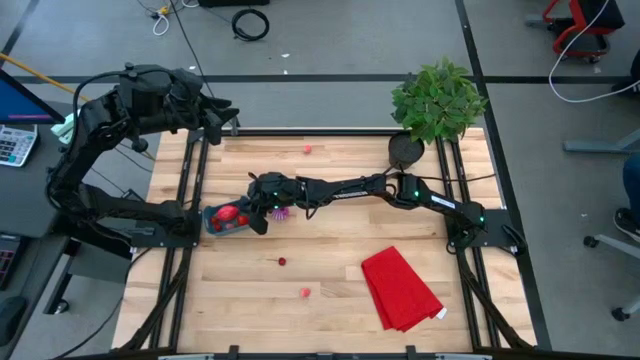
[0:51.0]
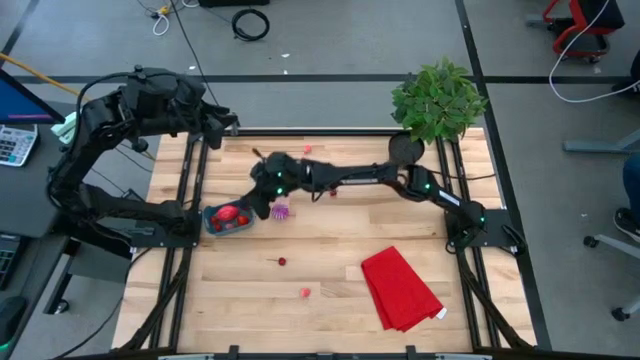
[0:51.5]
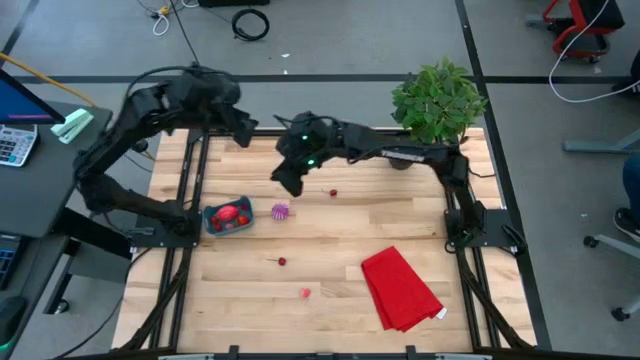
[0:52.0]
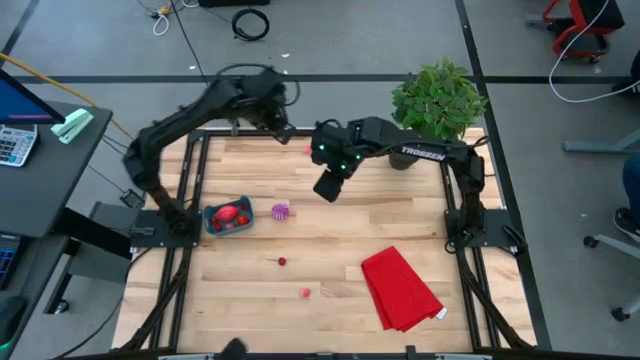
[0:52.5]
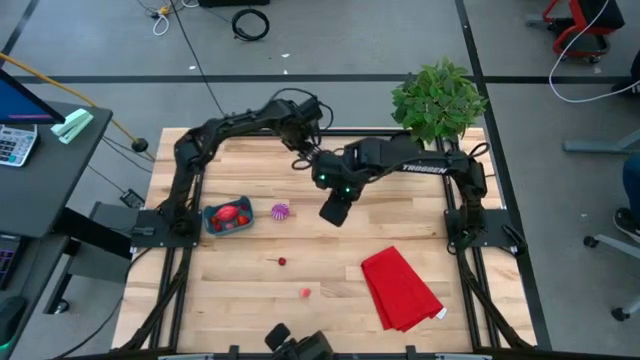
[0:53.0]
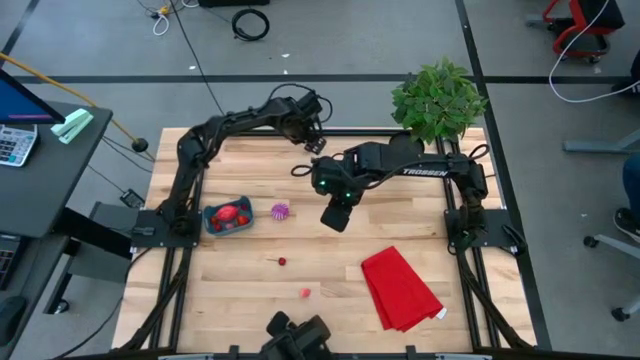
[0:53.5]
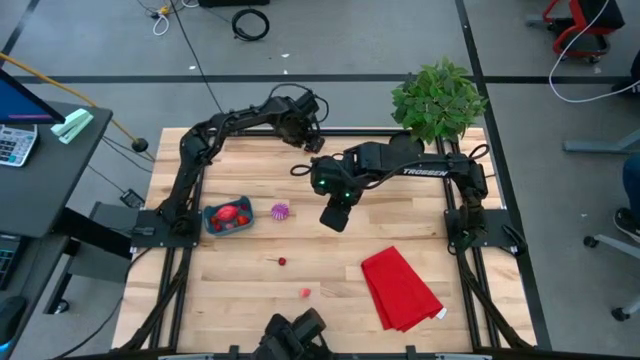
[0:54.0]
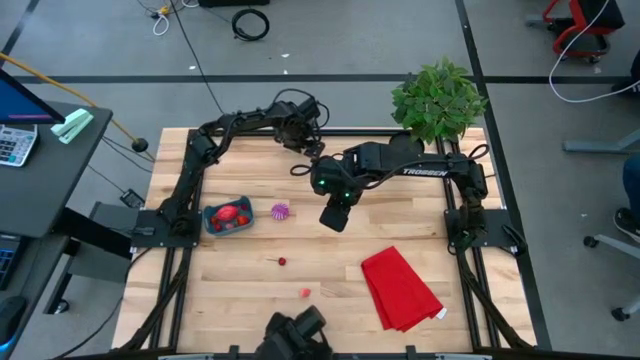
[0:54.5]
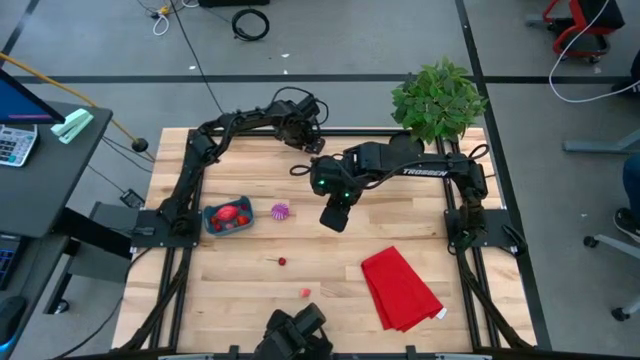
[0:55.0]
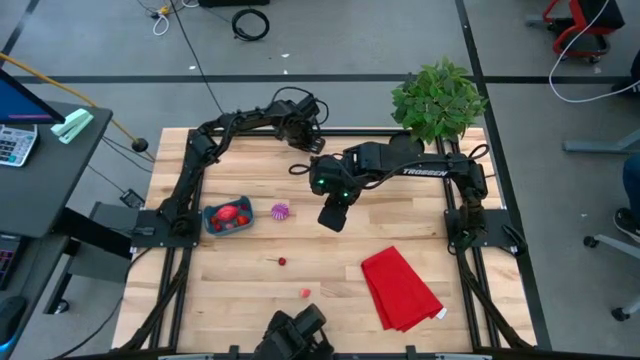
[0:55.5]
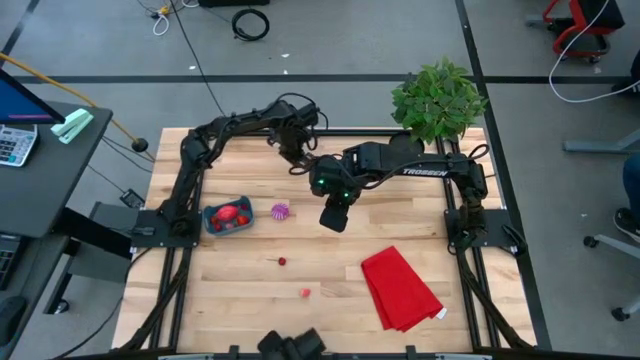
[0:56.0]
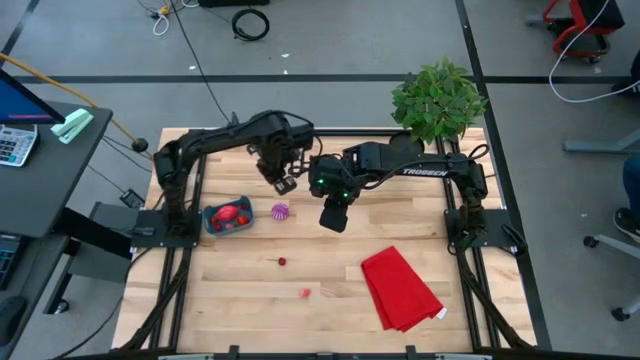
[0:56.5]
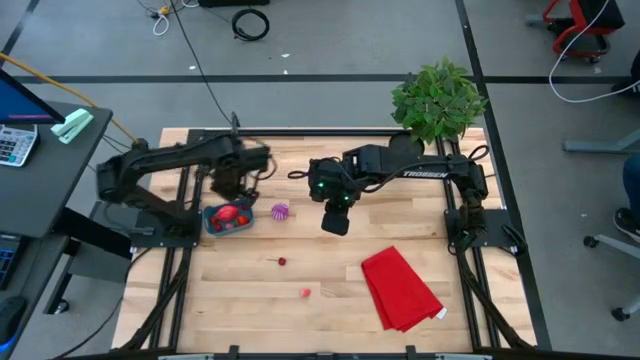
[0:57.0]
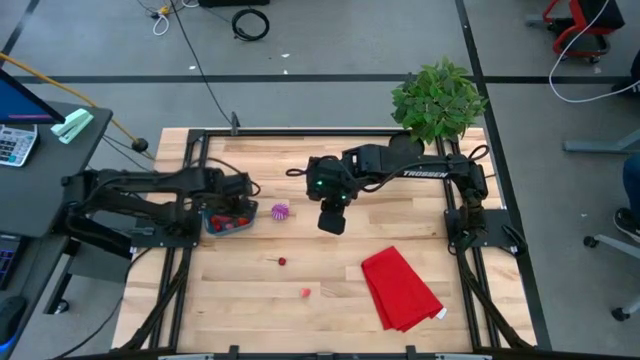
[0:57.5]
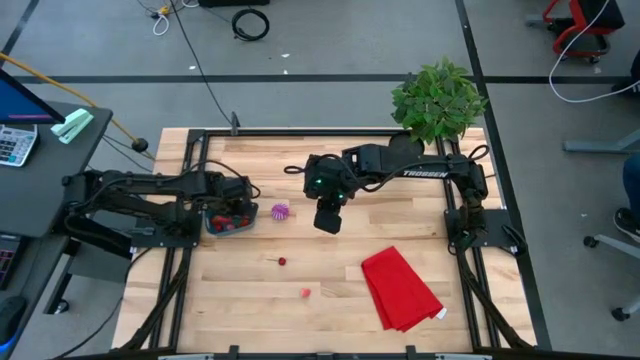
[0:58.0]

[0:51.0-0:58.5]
Task: Pick and placing Produce into tupperware
Put the top pink peach into the blue bin

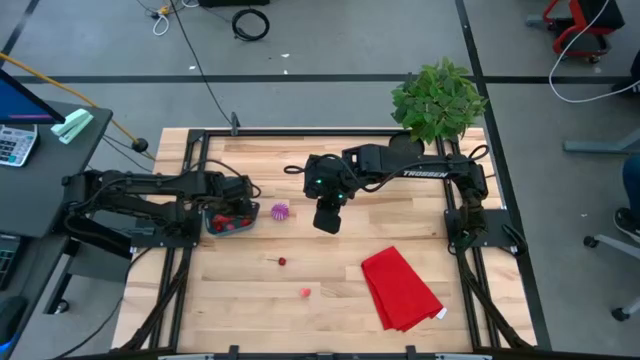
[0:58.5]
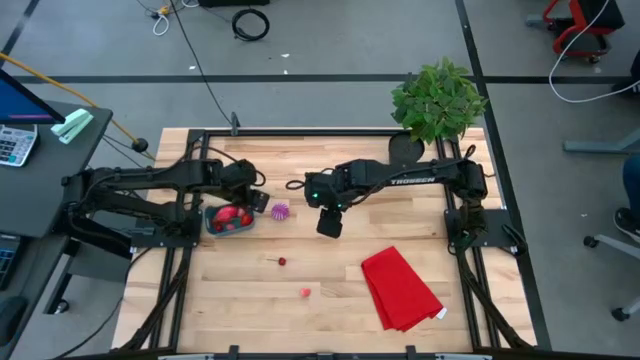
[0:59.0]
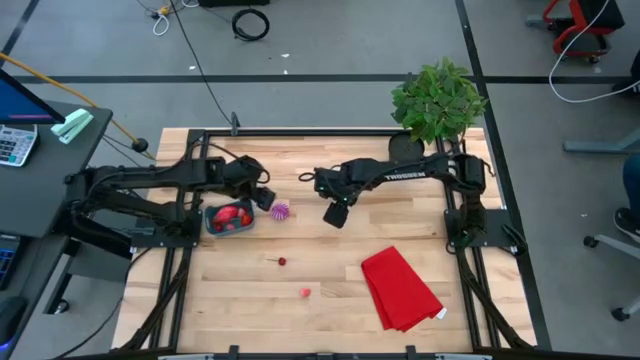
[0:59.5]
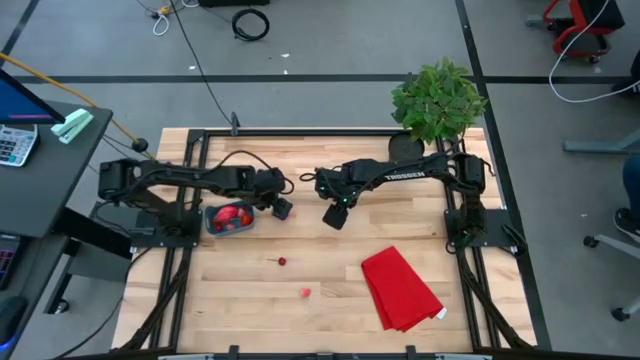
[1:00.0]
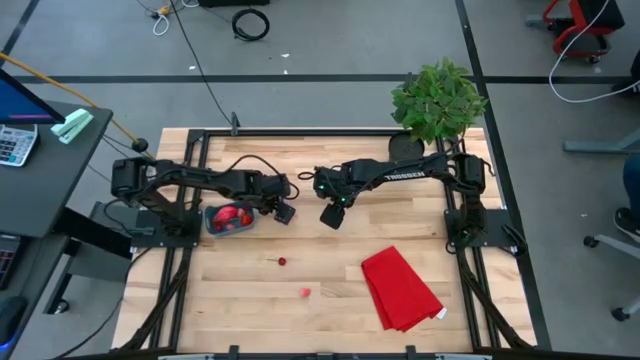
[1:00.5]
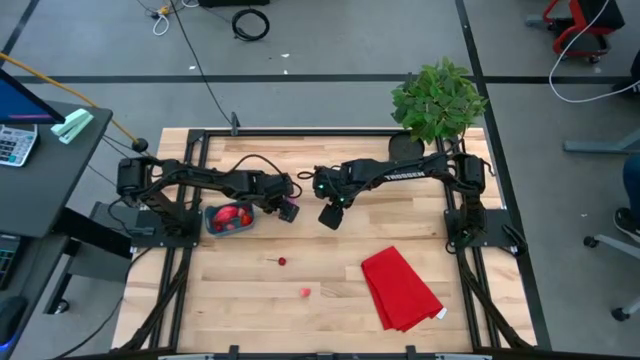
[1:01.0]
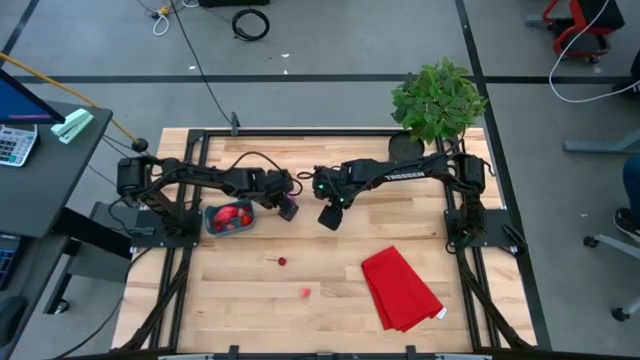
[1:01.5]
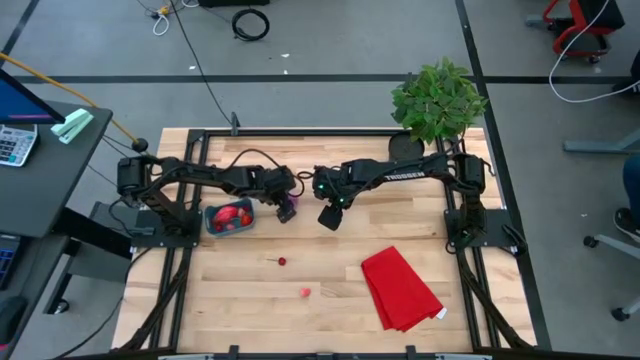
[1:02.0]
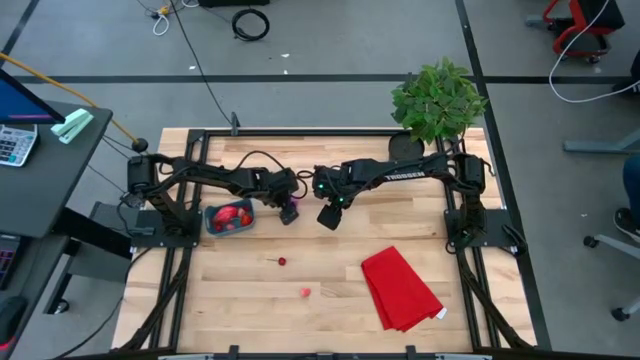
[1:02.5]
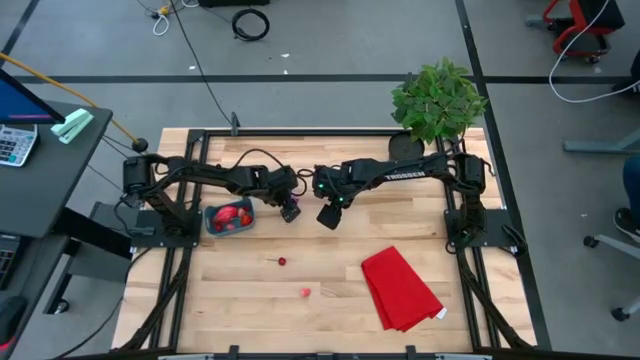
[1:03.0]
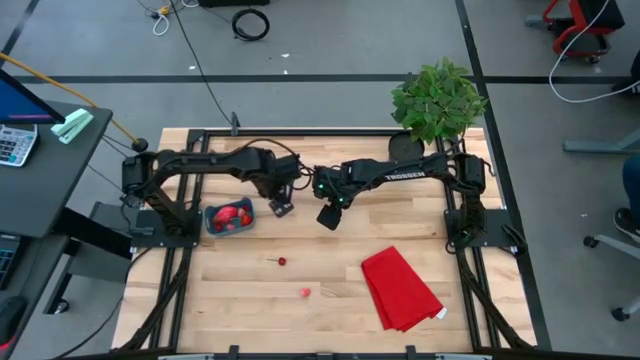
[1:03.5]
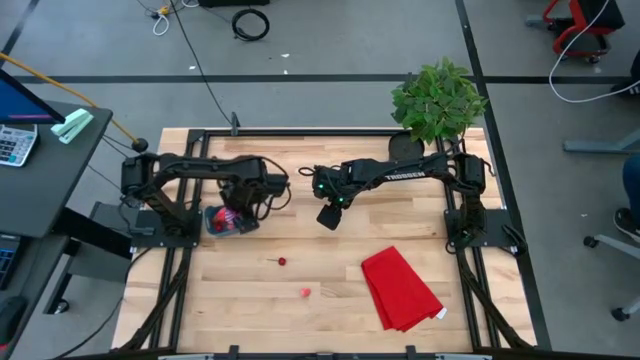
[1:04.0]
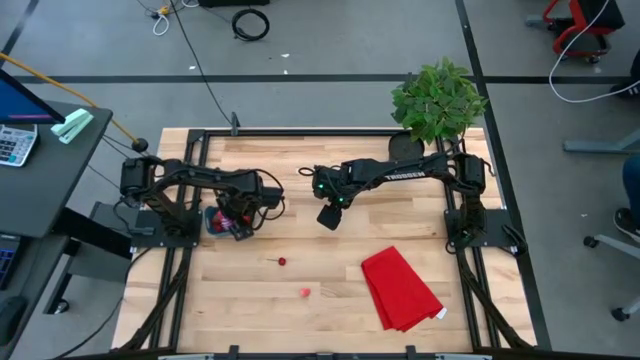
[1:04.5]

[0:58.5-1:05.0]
Put the purple onion into the blue bin

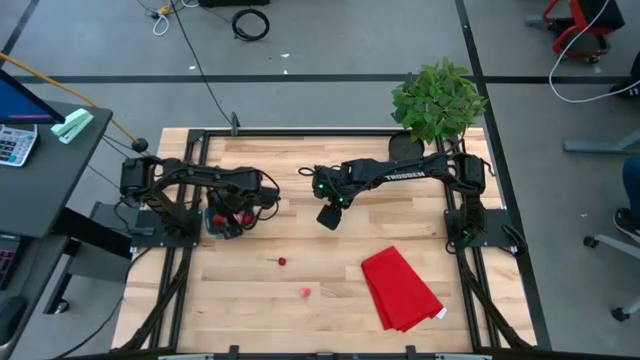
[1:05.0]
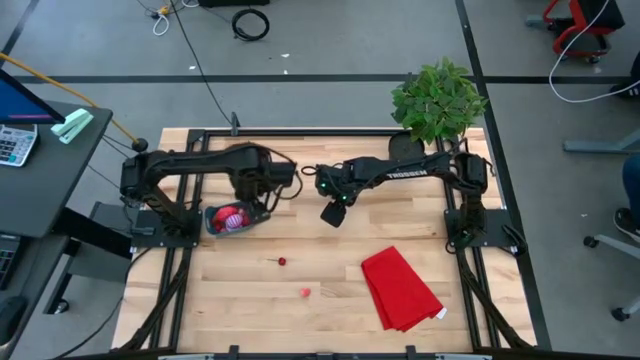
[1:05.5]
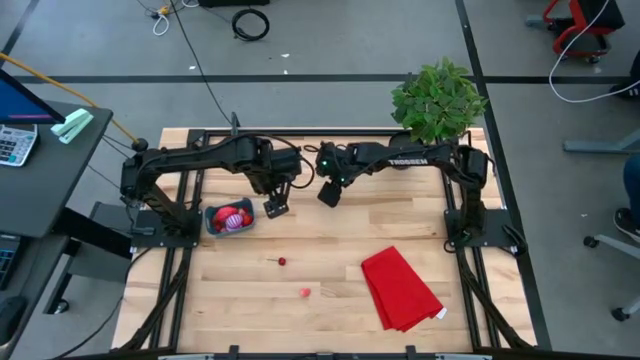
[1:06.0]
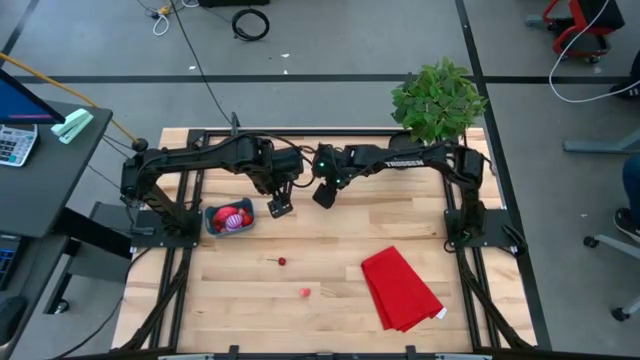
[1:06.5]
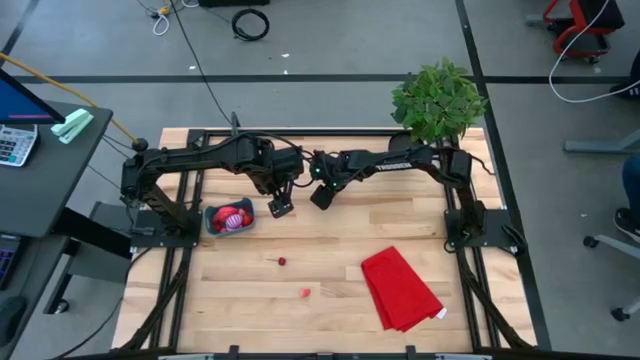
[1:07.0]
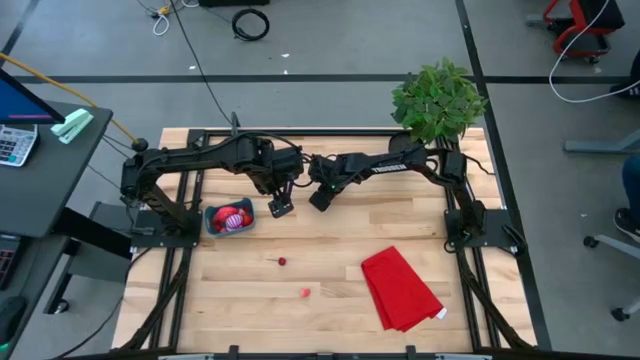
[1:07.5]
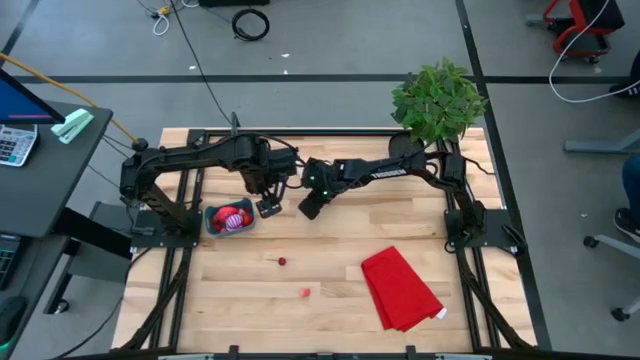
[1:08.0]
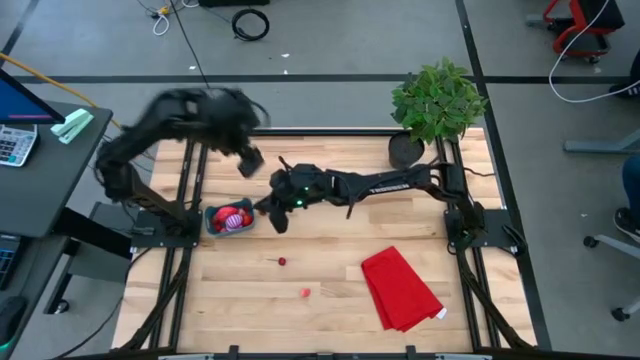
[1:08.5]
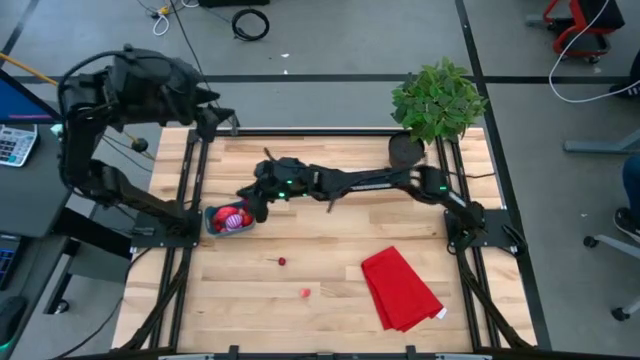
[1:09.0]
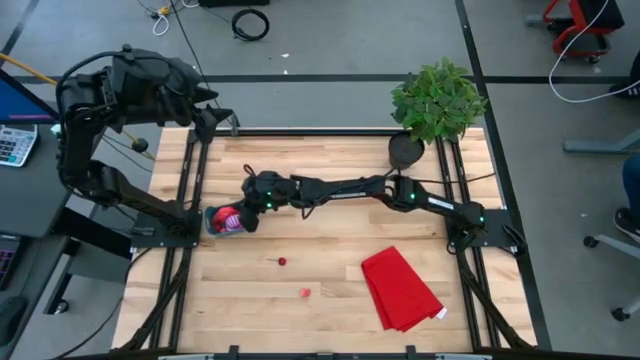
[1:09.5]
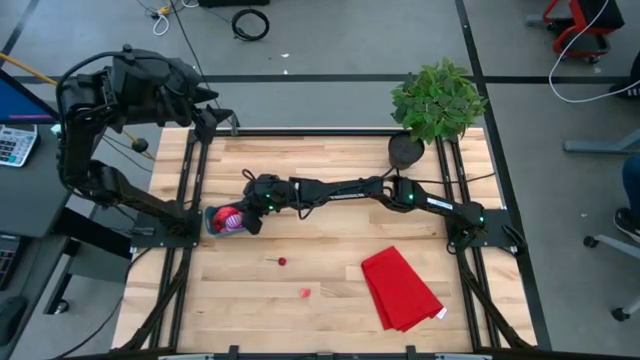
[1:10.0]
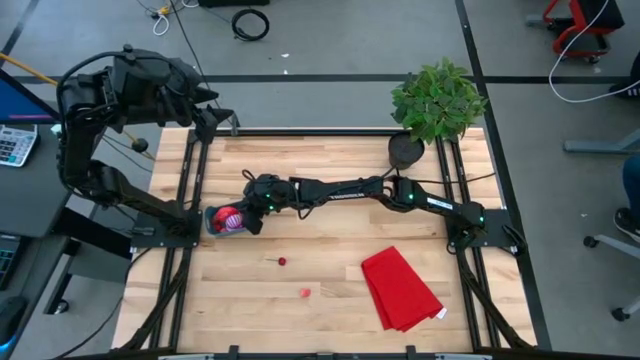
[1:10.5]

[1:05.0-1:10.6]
Put the top red cherry into the blue bin

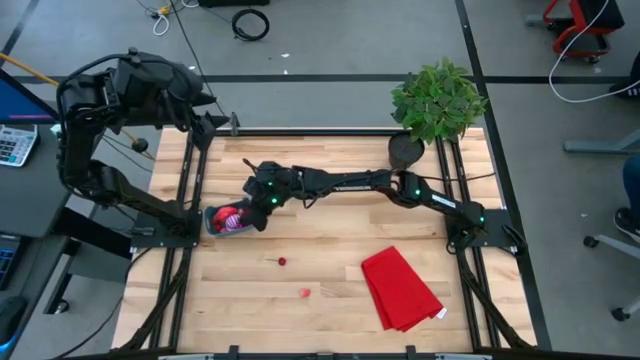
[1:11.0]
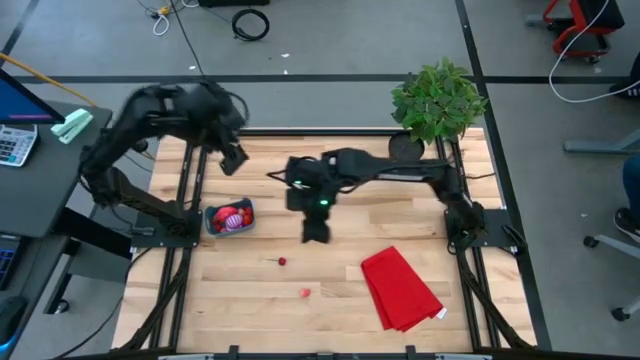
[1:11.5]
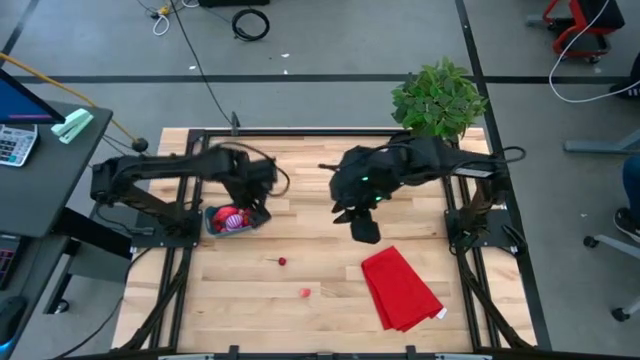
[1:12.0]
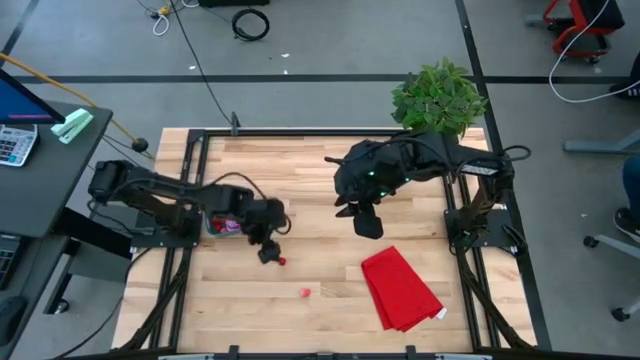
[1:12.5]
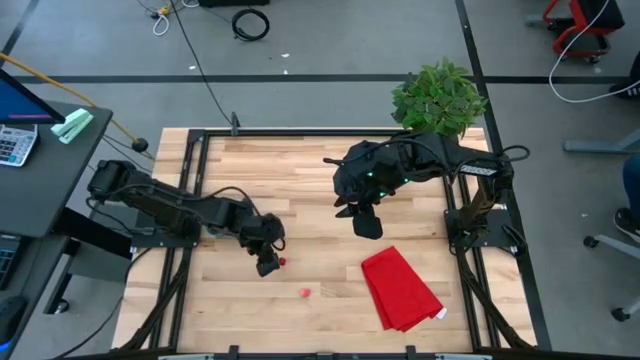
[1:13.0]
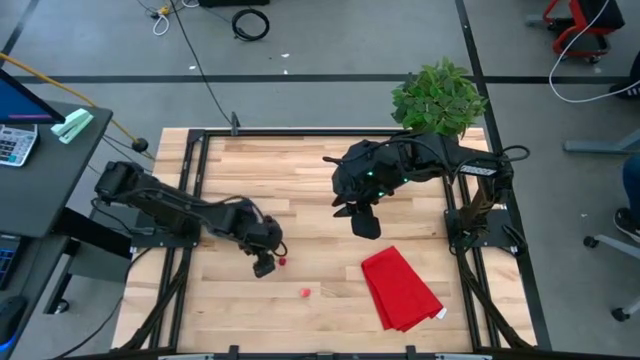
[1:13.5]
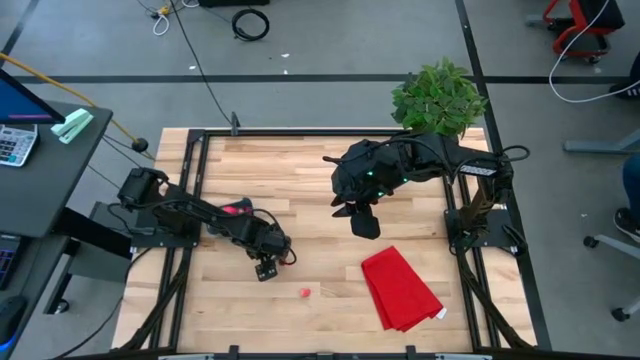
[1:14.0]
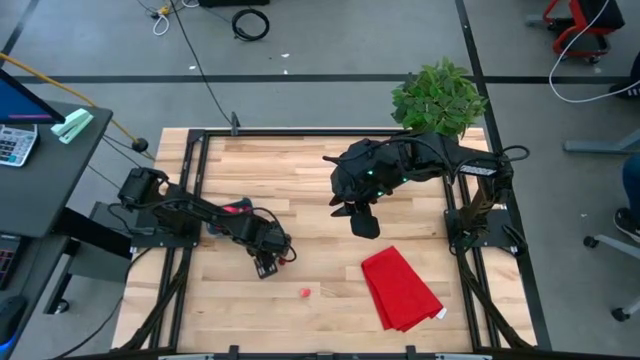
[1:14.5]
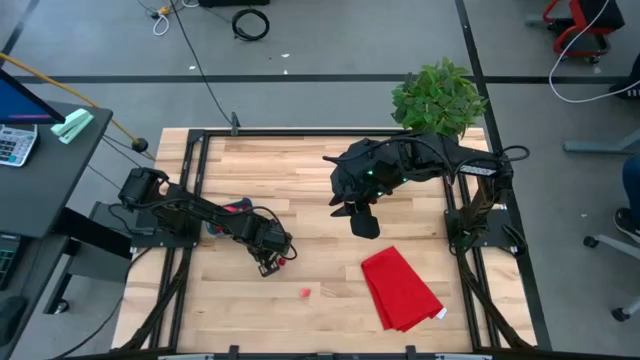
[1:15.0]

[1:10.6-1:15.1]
Put the red cherry into the blue bin
